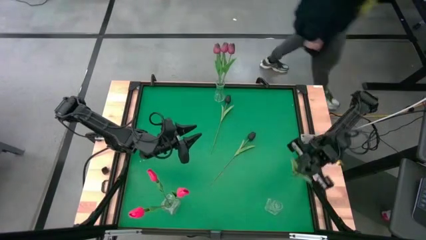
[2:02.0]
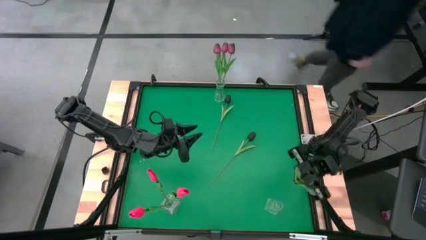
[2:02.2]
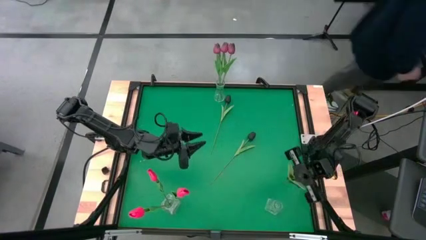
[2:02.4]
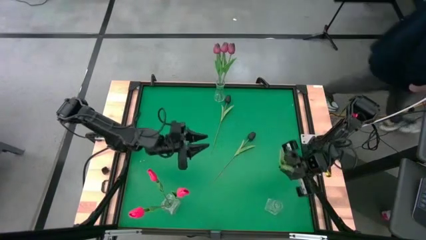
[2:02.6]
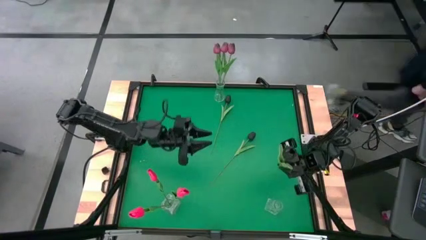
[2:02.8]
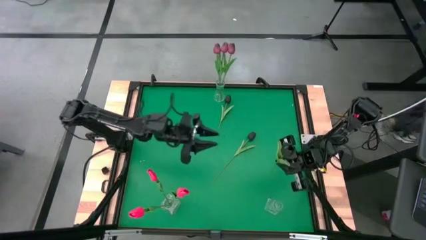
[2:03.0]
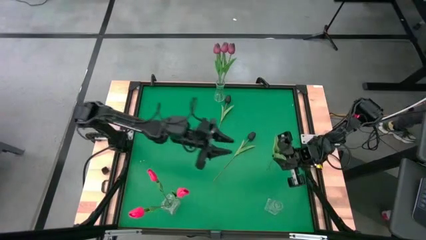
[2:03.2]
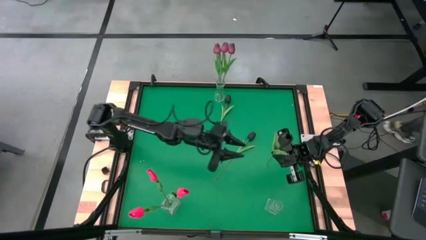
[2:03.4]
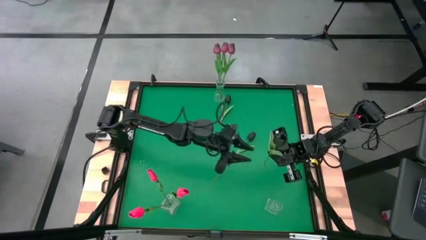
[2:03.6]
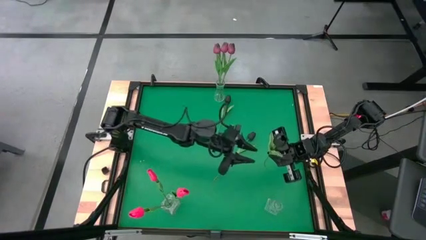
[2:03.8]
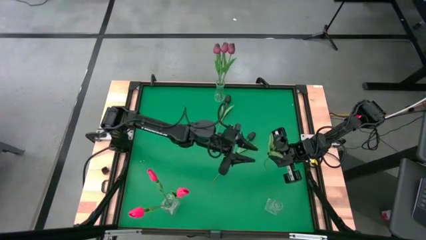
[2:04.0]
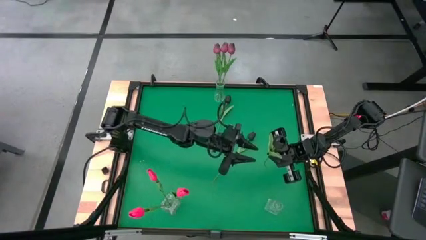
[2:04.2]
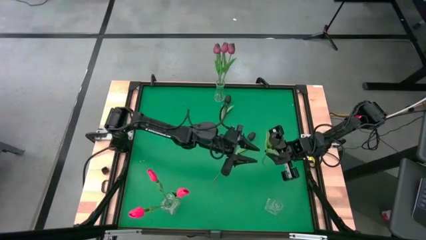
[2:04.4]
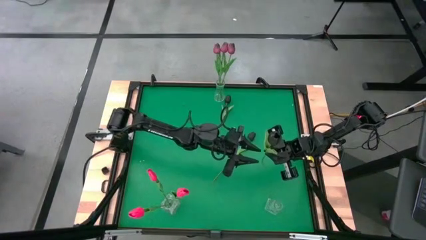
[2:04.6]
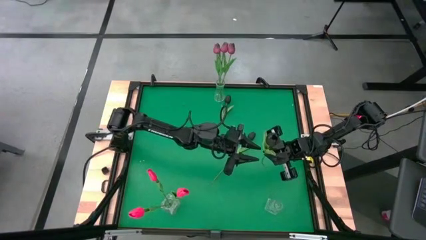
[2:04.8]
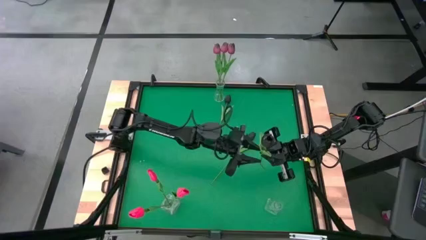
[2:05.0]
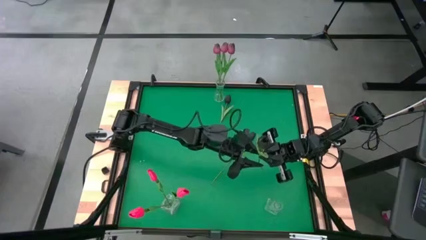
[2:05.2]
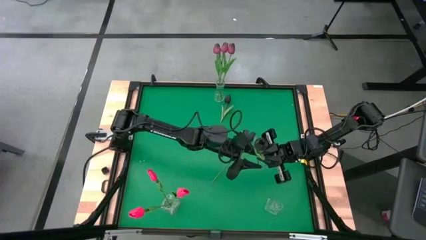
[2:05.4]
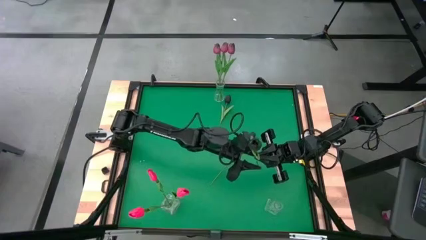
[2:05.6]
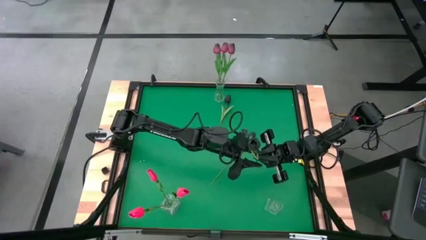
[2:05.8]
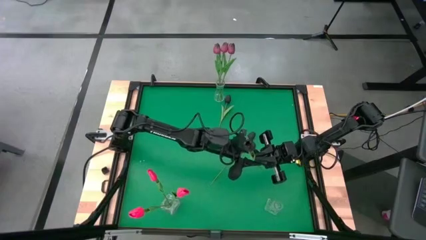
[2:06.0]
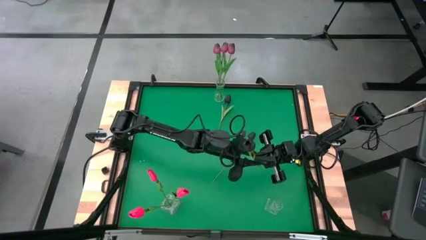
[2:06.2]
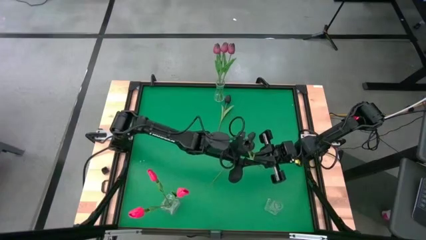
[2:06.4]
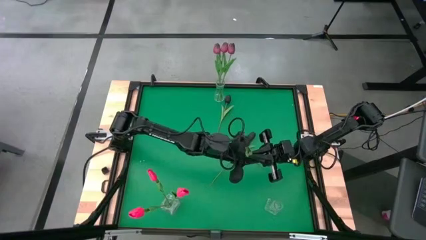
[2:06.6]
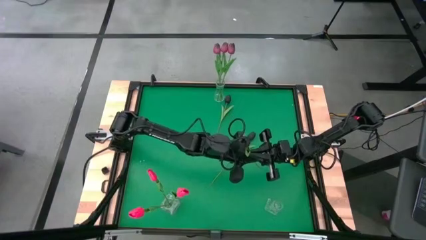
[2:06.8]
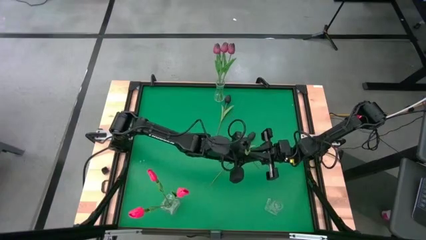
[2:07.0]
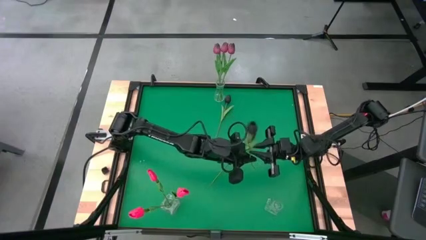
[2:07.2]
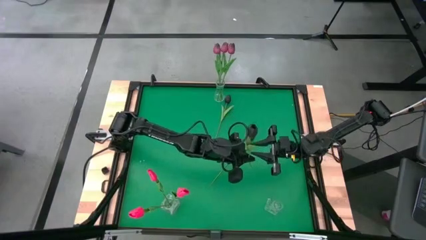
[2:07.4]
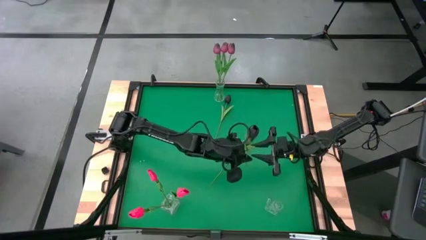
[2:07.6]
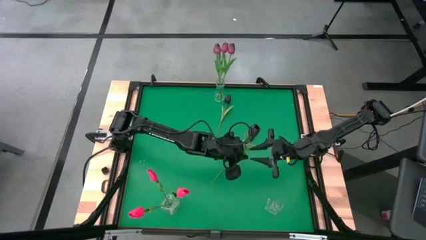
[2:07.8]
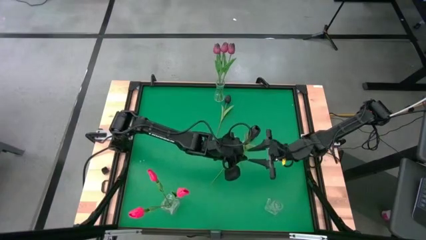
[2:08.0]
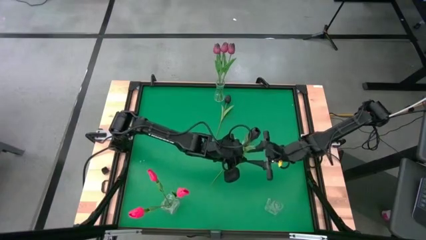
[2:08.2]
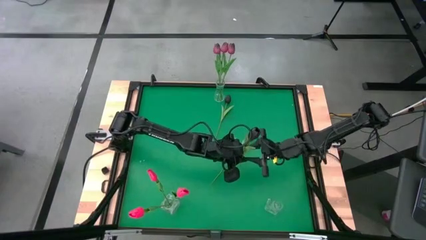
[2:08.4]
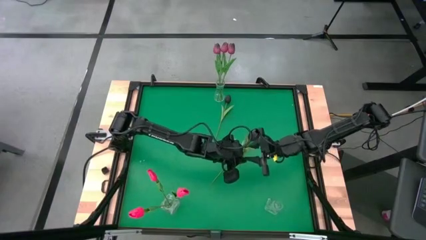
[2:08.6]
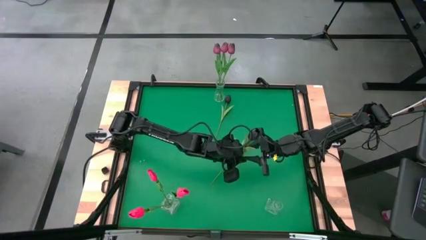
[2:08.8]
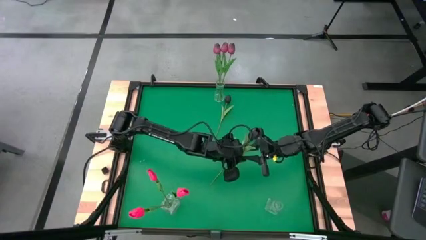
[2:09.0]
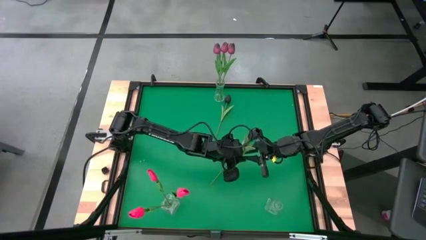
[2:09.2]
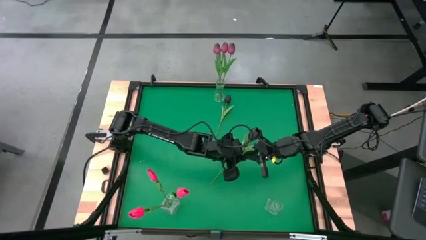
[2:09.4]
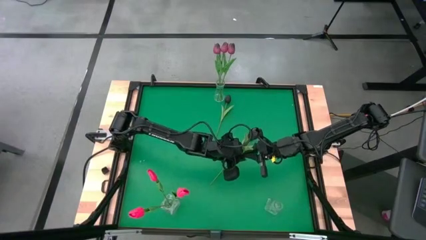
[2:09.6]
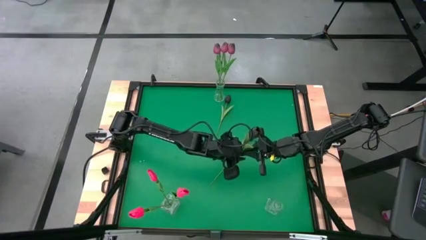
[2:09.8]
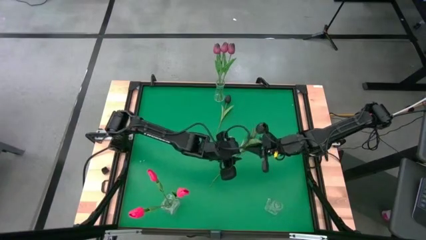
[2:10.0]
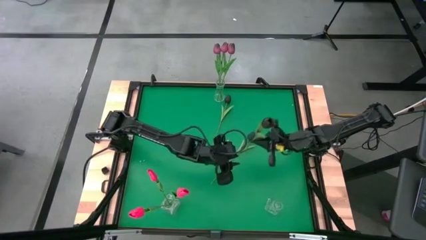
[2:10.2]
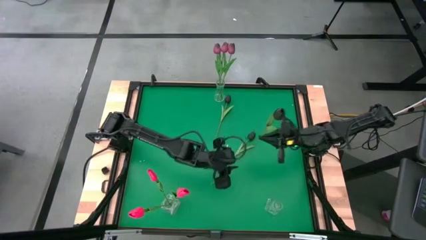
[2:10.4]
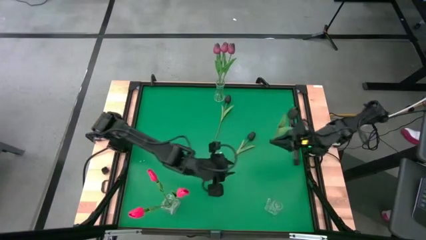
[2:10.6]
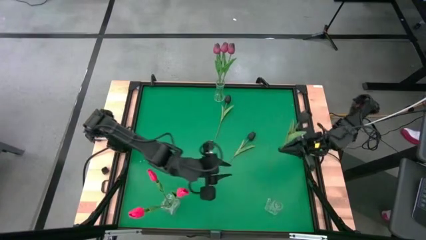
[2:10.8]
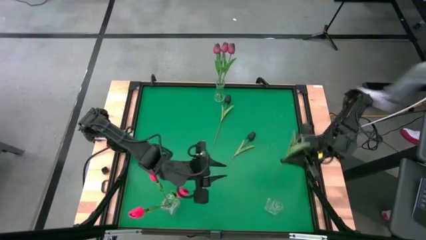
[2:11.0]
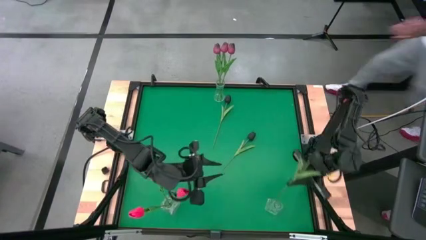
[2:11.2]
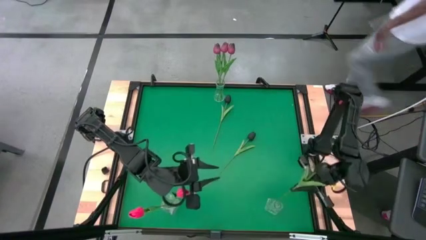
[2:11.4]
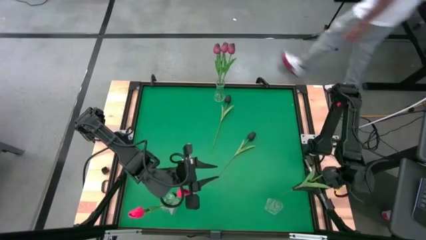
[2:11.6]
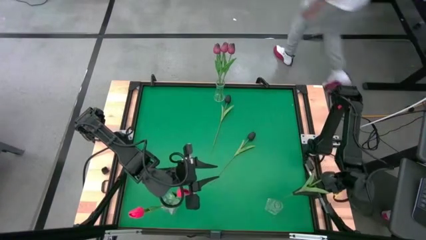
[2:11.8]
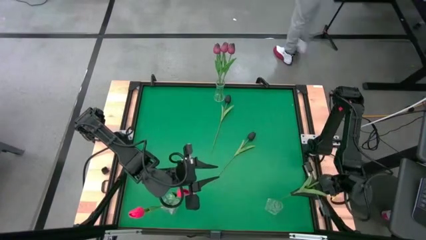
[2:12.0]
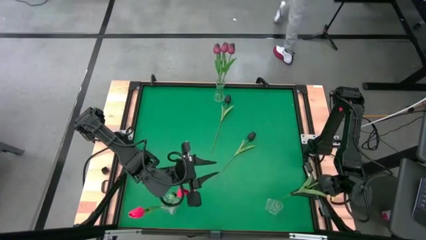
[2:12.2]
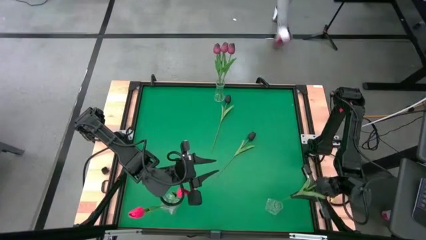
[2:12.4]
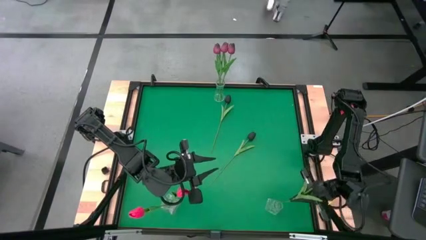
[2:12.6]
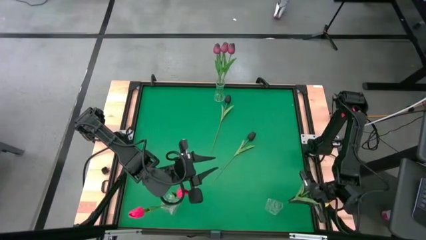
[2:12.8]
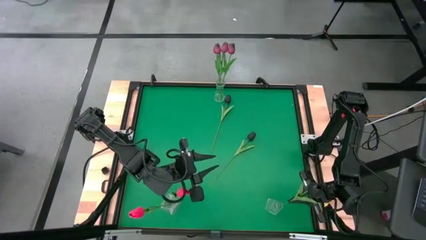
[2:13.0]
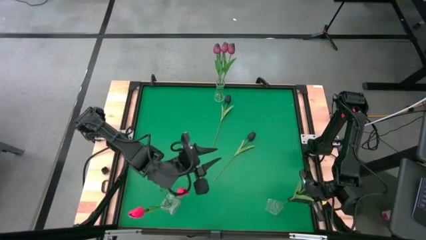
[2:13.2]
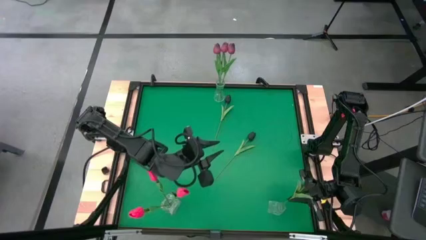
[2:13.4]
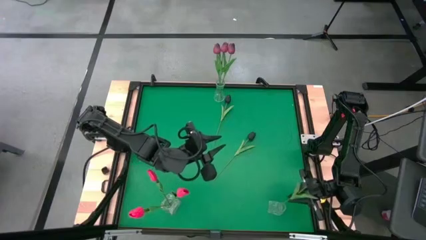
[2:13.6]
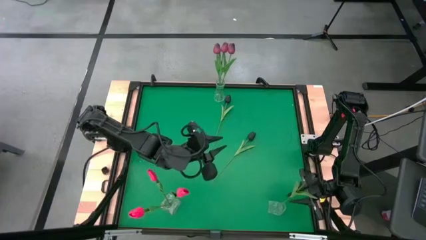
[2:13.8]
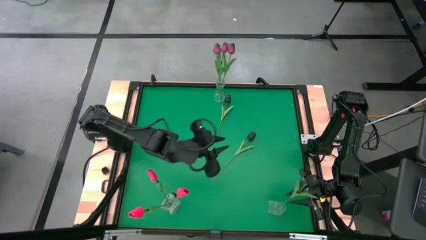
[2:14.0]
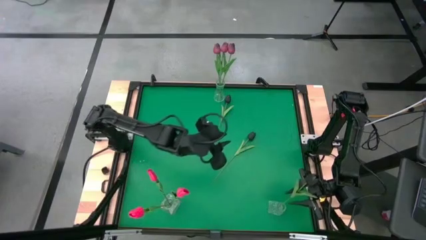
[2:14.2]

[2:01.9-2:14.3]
Task: Sort flowers into vase by color
Put the middle black tulip into the bottom right transparent vase
